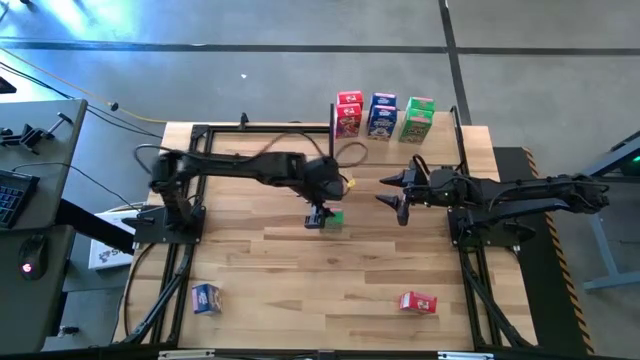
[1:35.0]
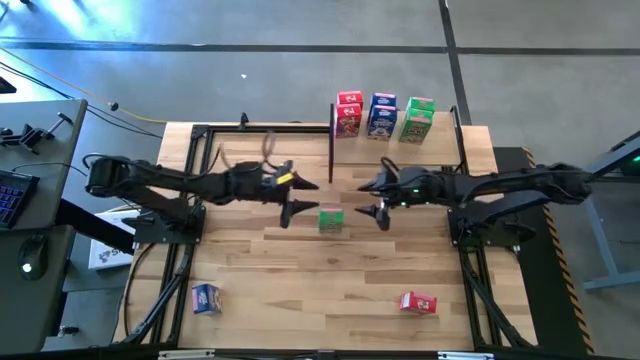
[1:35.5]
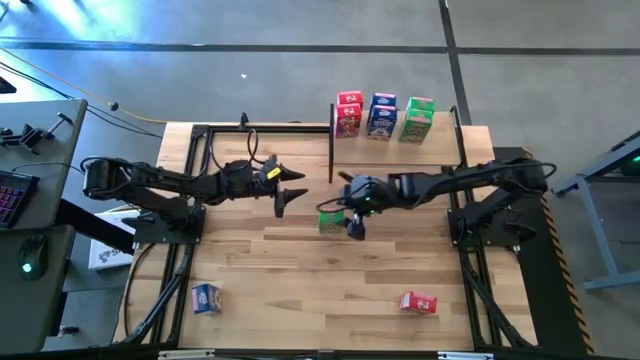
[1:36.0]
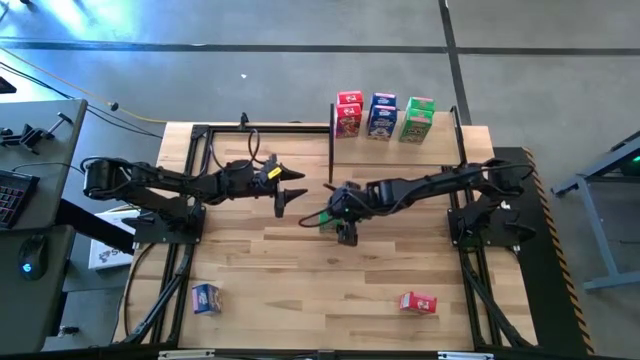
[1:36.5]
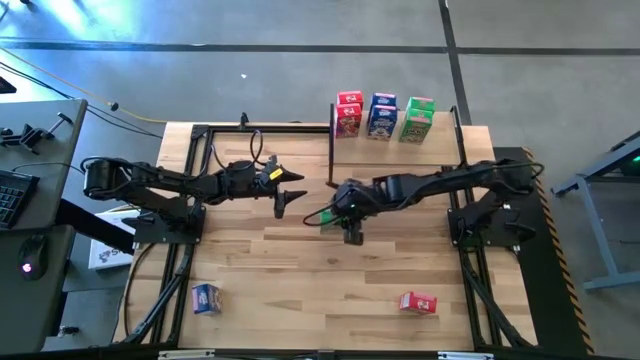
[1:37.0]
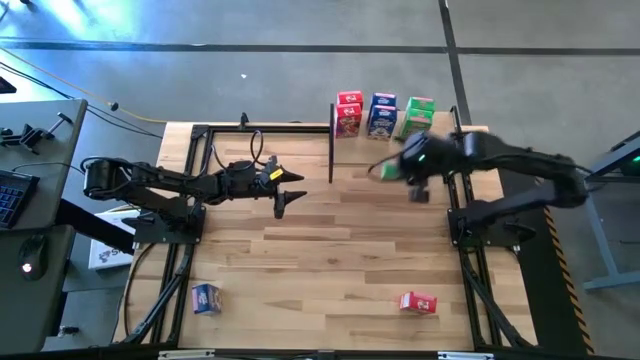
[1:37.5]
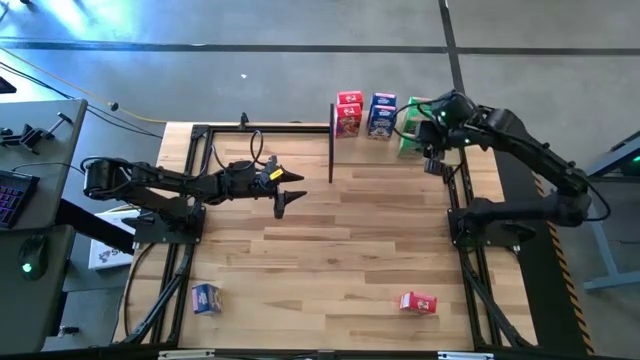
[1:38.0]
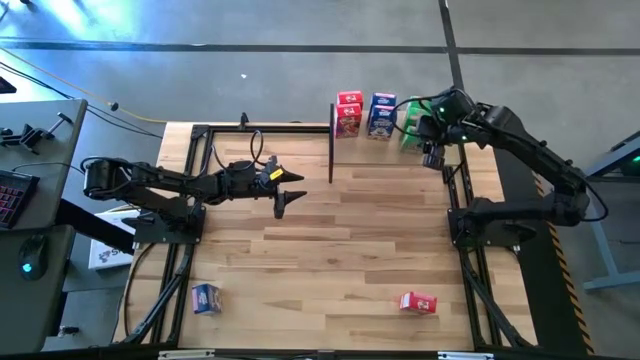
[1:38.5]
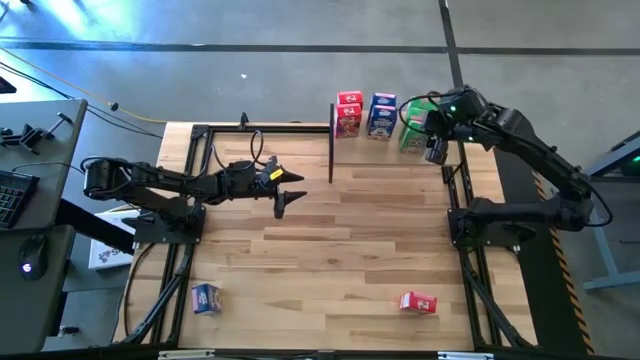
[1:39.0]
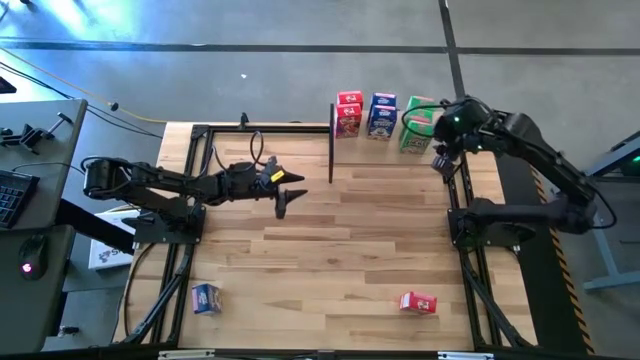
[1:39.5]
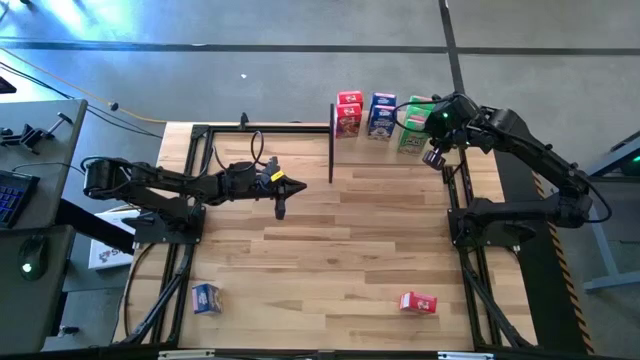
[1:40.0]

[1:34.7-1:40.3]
Task: Stack cereal on shelf
Put the green cereal box on the shelf and aligned with the other green cereal boxes

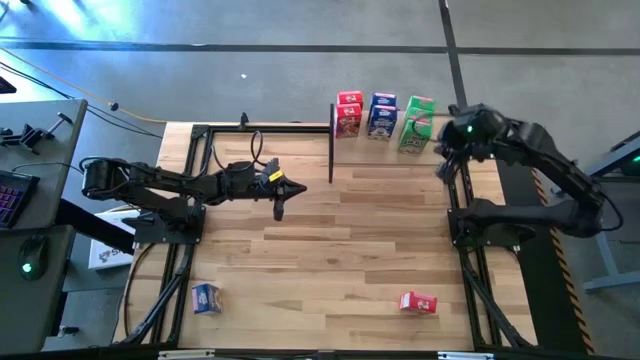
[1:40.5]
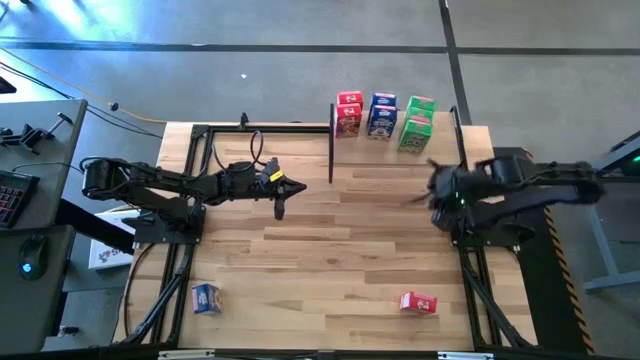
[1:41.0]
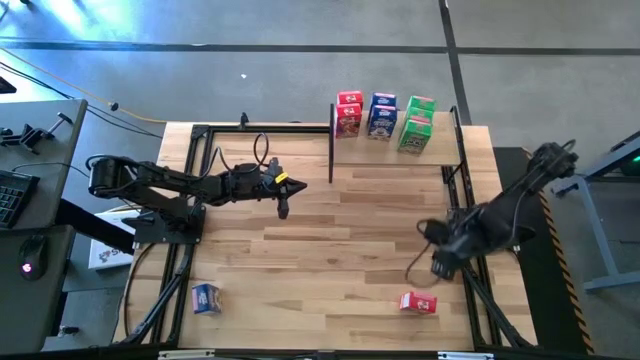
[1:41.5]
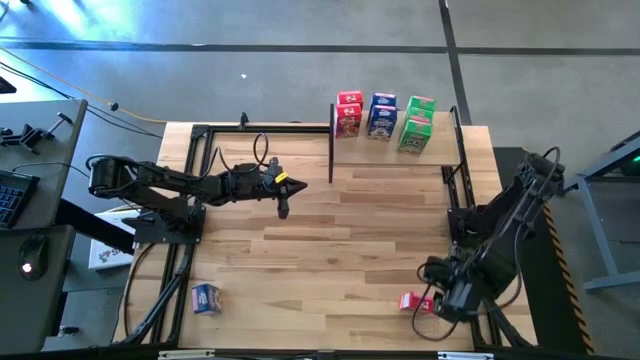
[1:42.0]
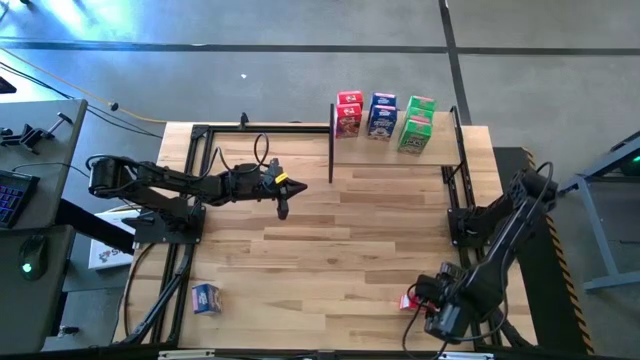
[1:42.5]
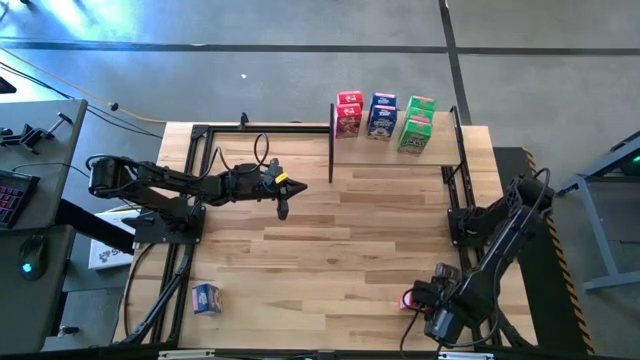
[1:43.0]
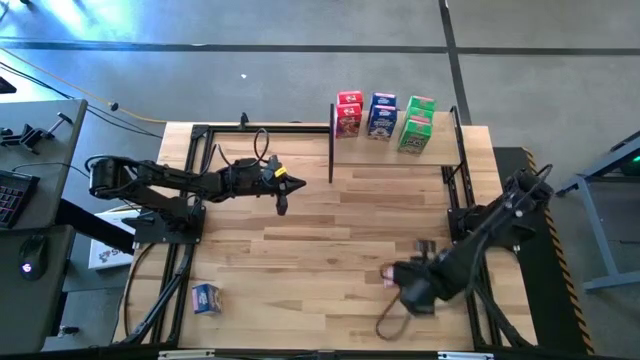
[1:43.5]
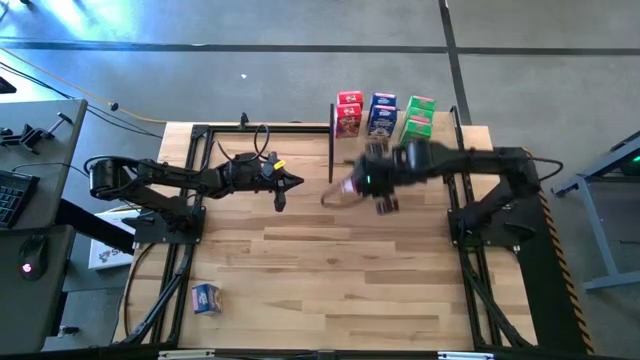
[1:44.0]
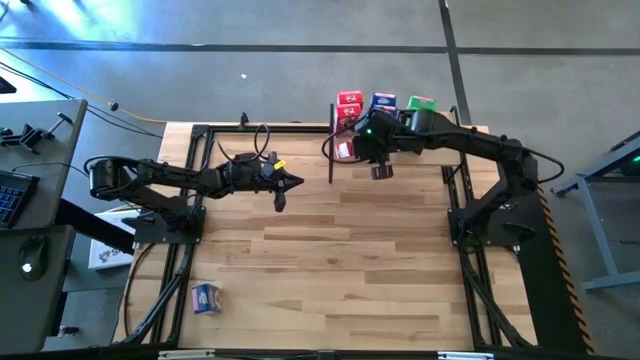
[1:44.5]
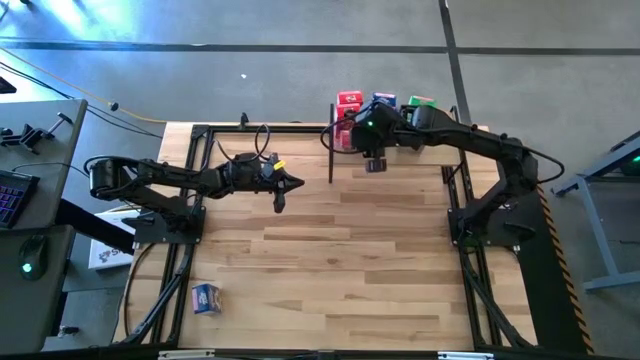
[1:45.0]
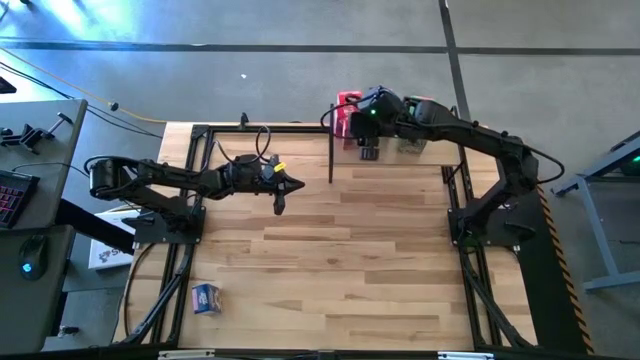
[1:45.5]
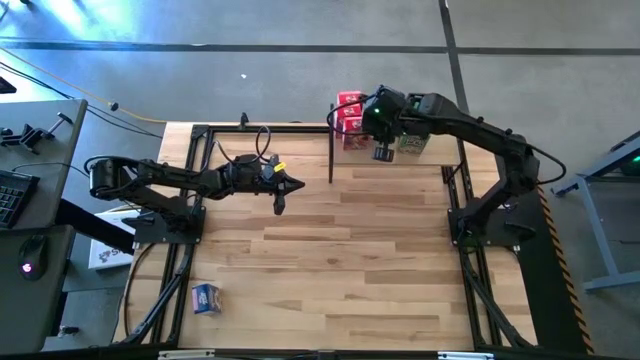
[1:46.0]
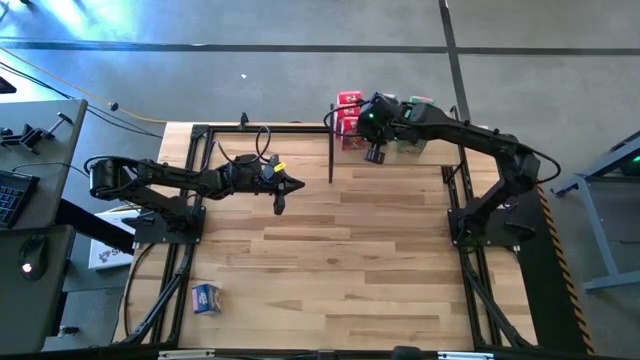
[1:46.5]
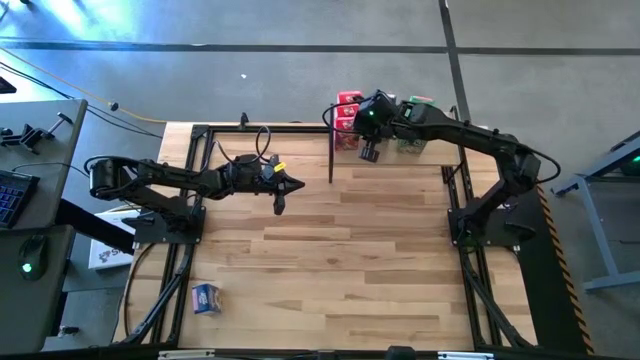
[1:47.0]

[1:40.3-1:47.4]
Put the red cereal box on the shelf and aligned with the other red cereal boxes

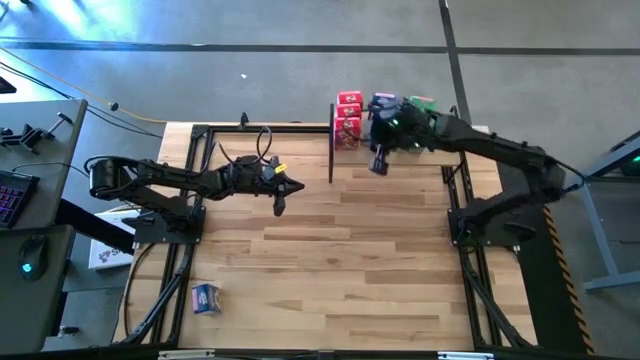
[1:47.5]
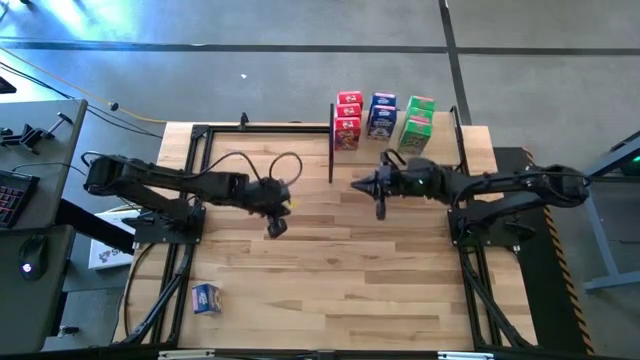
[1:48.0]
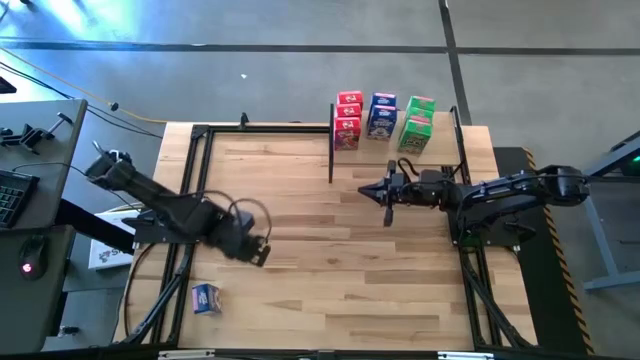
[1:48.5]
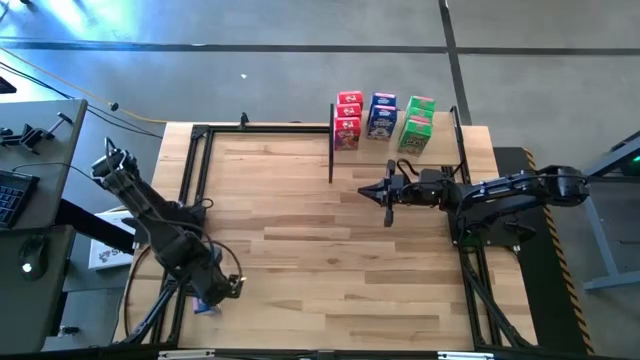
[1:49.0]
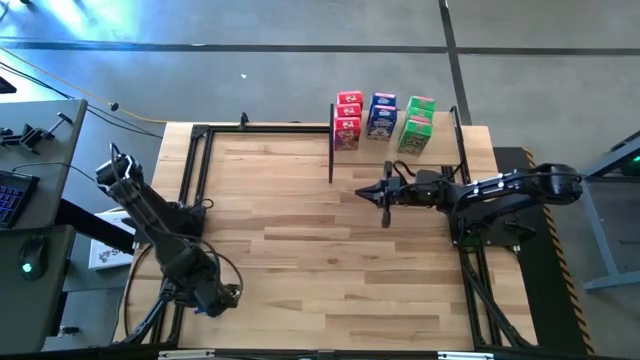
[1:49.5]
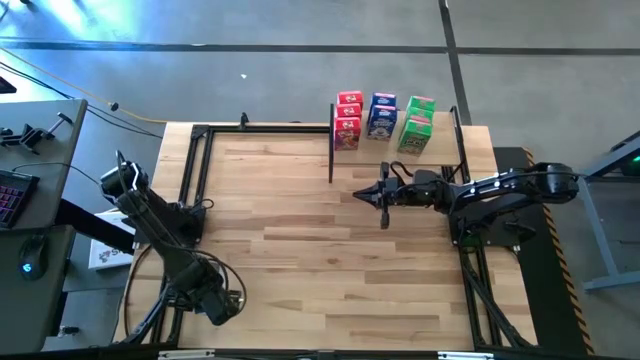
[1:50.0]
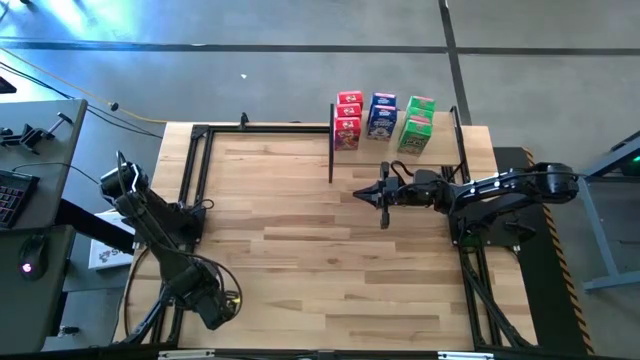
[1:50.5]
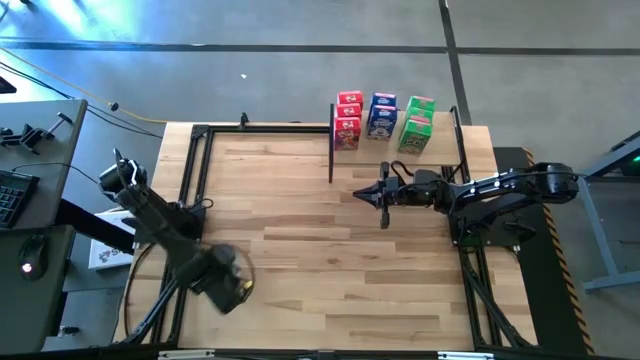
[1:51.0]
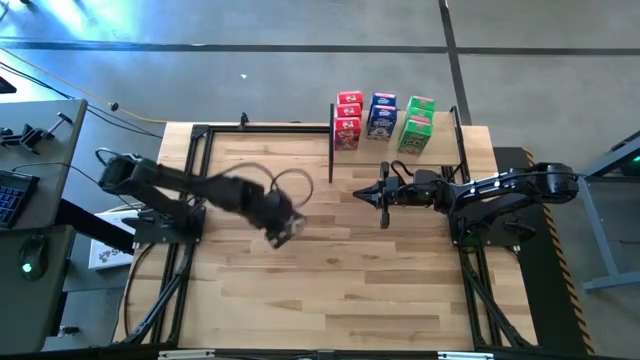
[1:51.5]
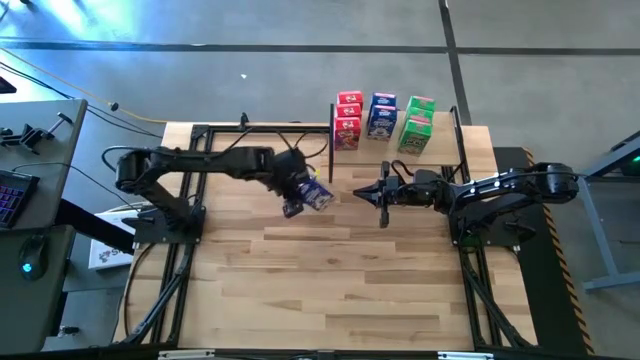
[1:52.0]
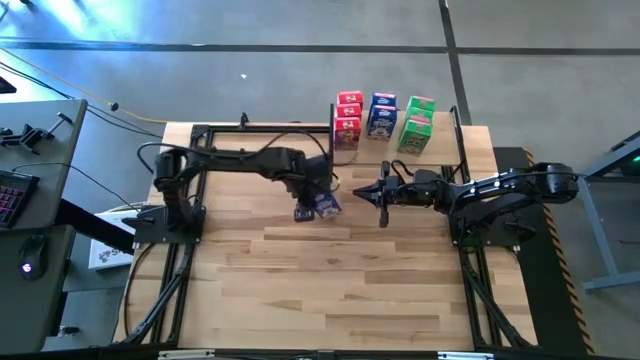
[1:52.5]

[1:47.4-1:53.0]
Move the blue cereal box to the center of the table

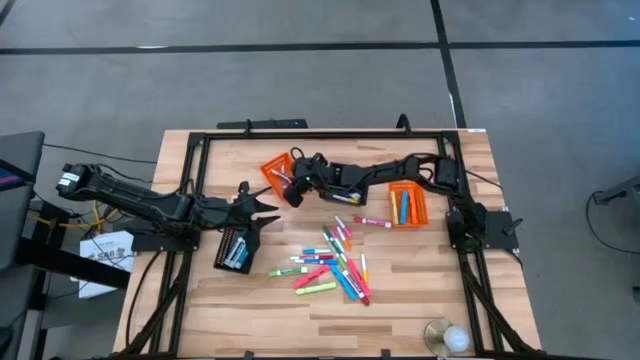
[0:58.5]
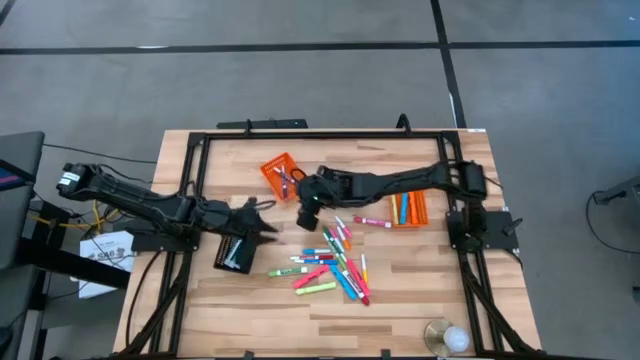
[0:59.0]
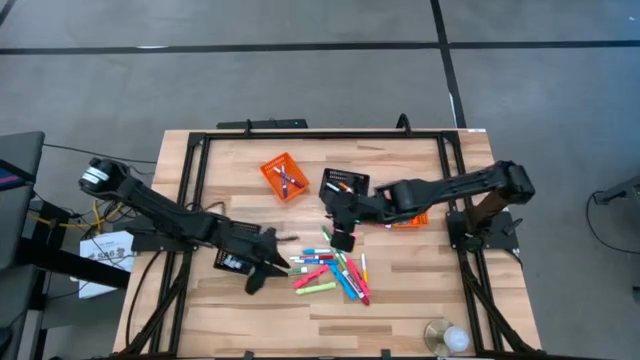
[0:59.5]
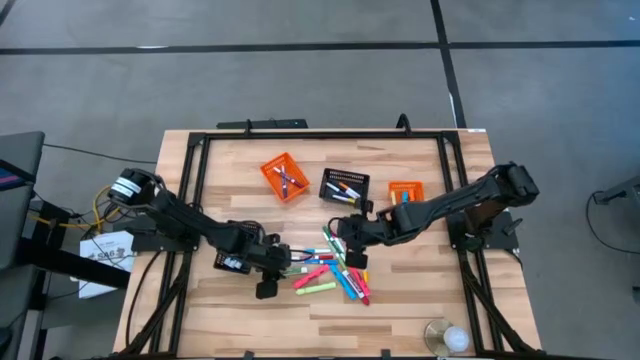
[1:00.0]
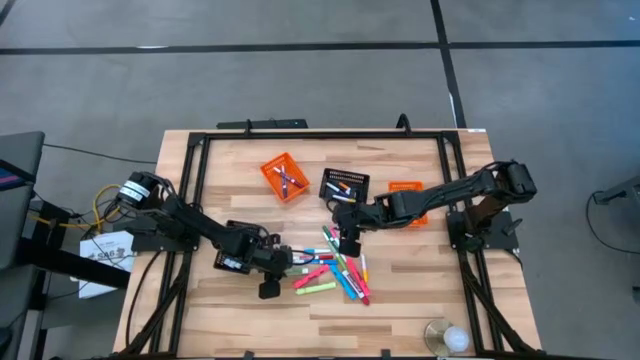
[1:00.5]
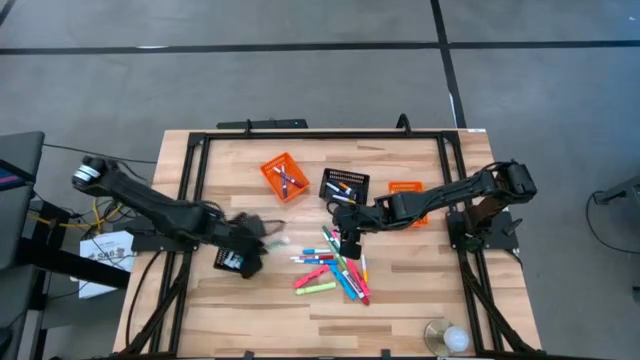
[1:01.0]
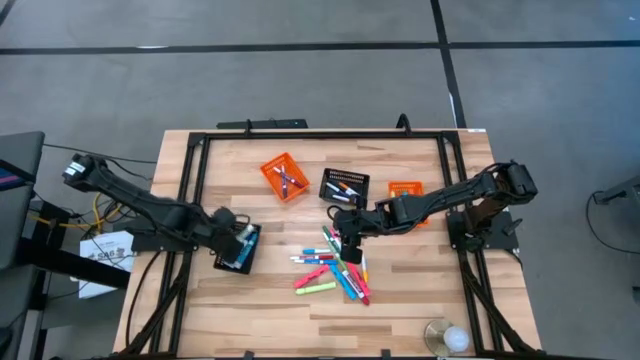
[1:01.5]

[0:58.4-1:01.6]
Task: Pick & Place Markers
Put the light green marker into the left black bin

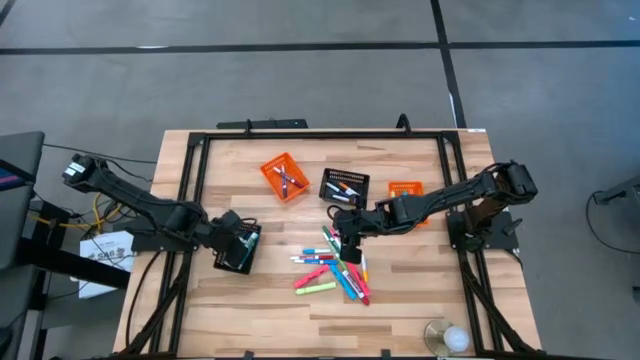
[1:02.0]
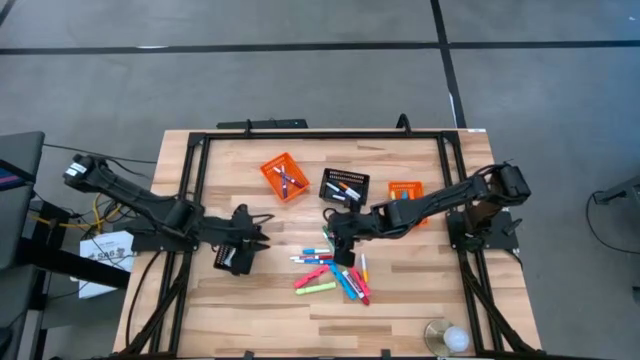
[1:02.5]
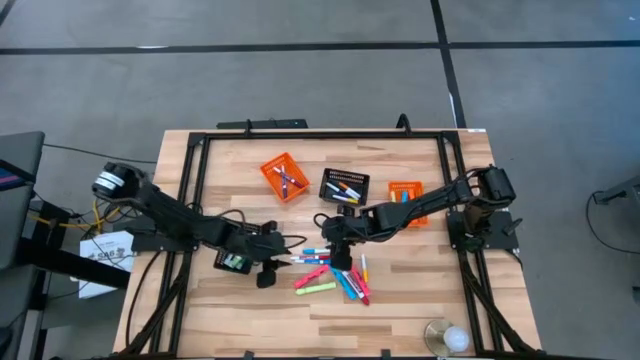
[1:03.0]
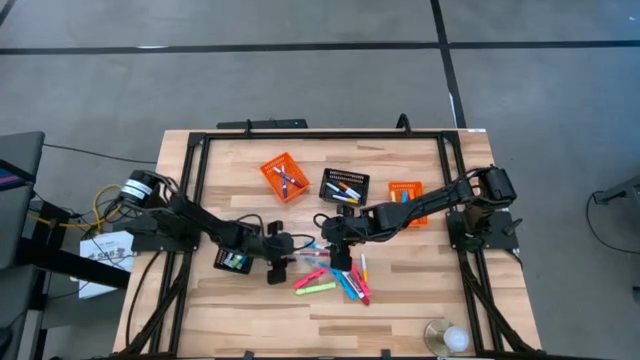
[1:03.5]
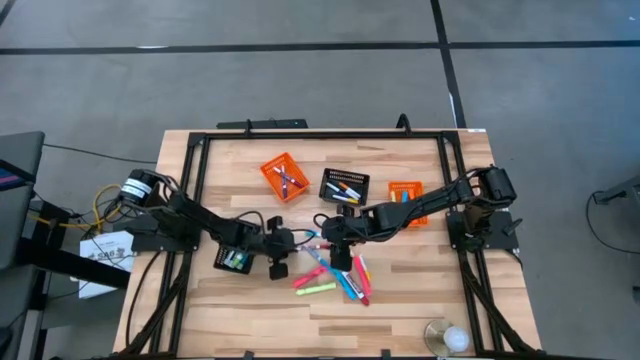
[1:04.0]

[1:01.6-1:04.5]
Put the red marker into the left orange bin
